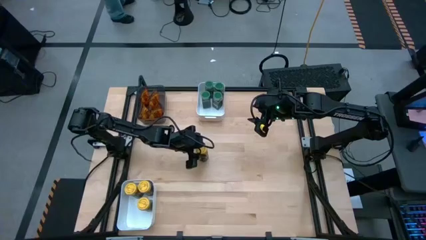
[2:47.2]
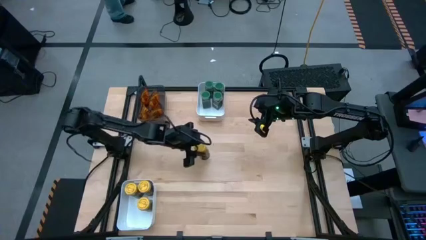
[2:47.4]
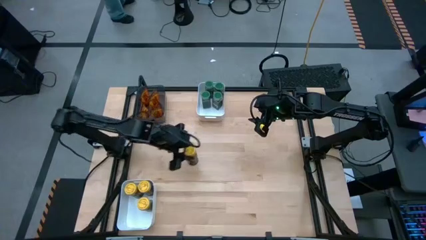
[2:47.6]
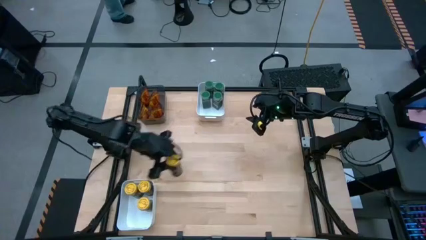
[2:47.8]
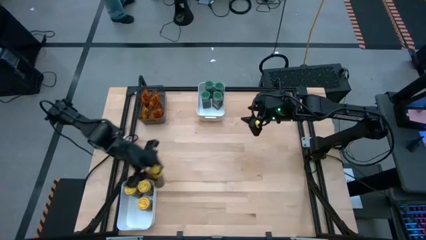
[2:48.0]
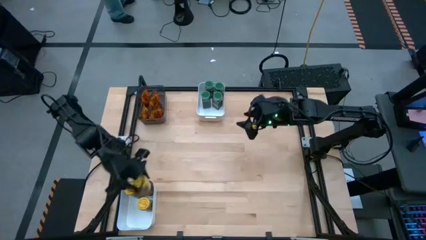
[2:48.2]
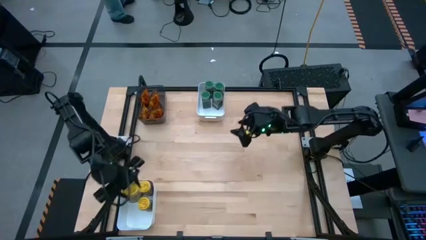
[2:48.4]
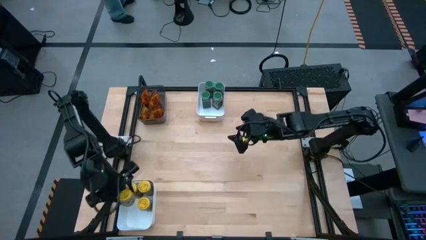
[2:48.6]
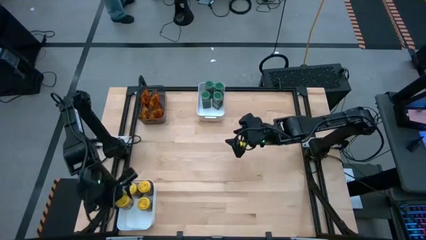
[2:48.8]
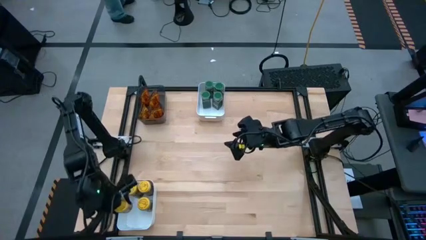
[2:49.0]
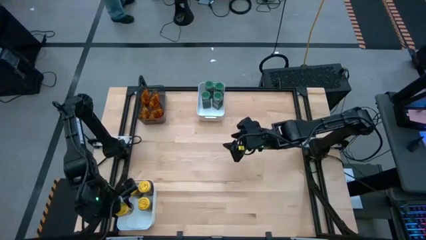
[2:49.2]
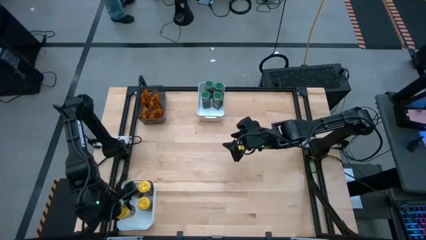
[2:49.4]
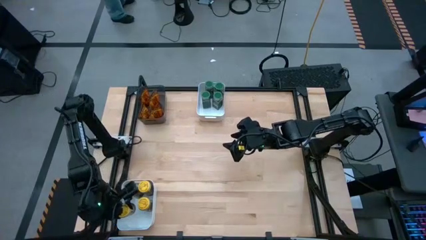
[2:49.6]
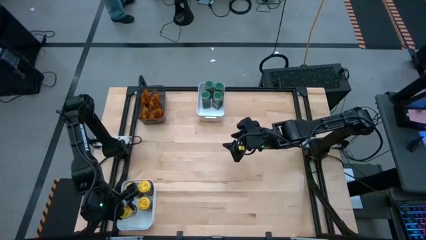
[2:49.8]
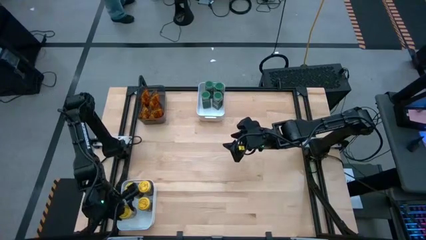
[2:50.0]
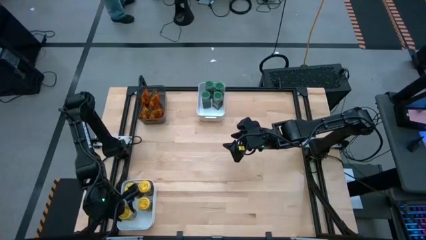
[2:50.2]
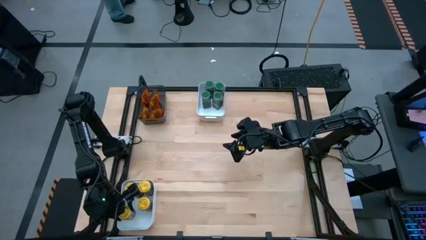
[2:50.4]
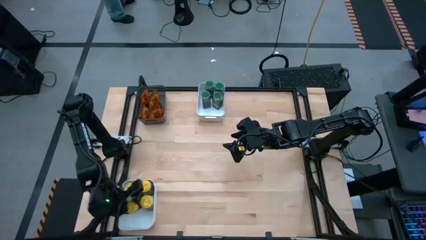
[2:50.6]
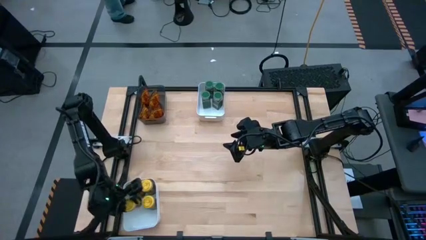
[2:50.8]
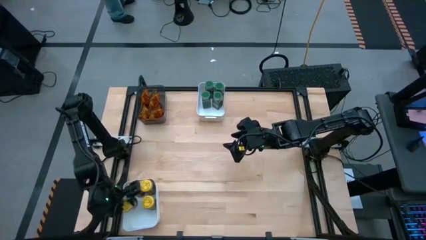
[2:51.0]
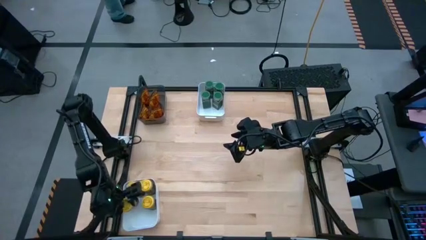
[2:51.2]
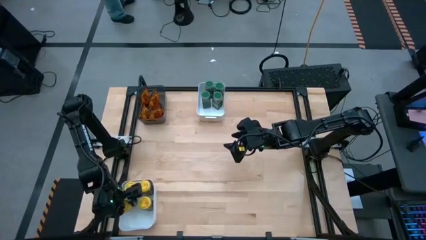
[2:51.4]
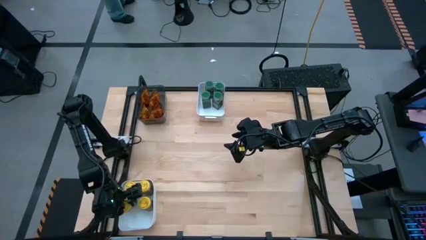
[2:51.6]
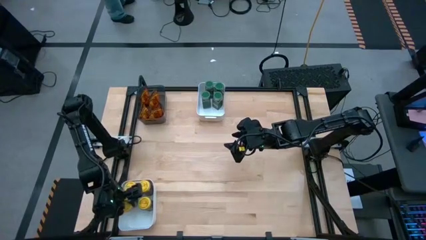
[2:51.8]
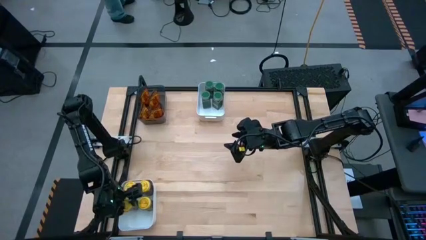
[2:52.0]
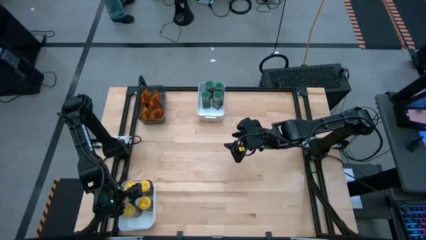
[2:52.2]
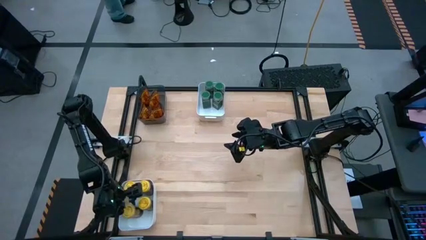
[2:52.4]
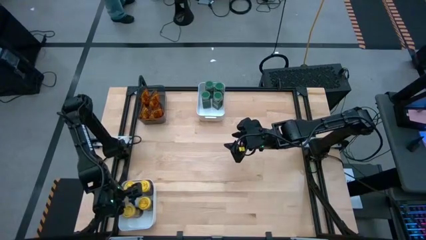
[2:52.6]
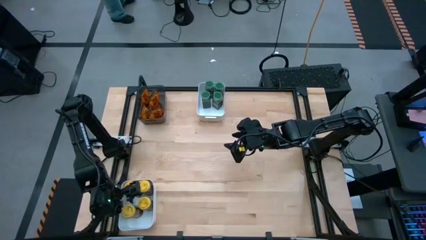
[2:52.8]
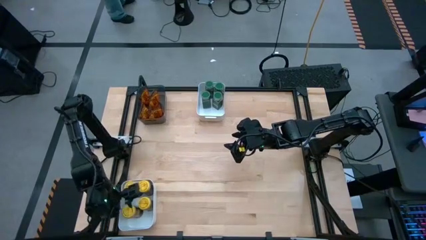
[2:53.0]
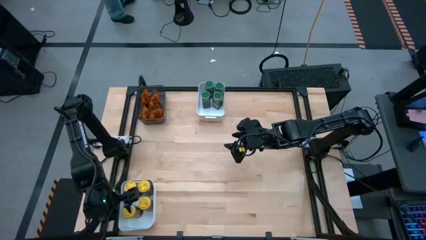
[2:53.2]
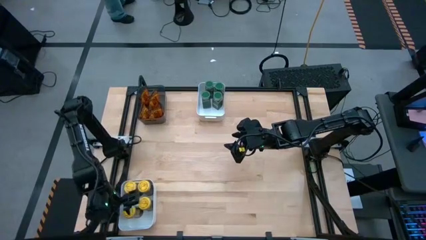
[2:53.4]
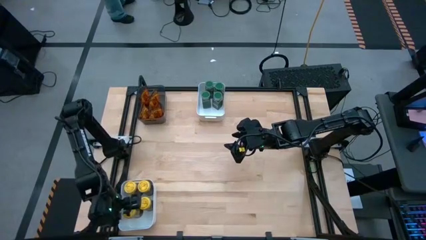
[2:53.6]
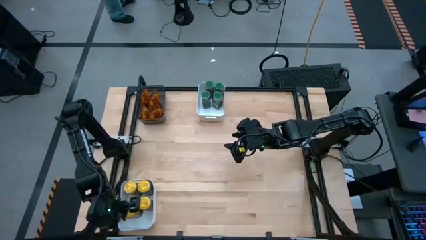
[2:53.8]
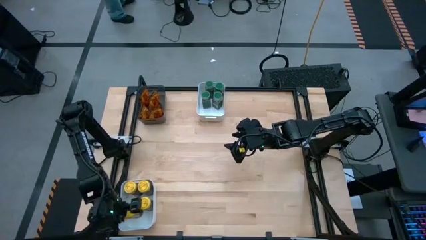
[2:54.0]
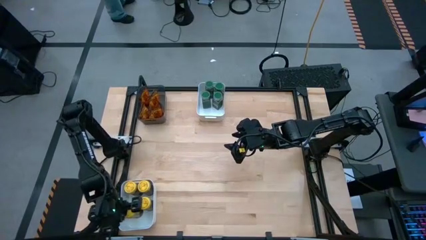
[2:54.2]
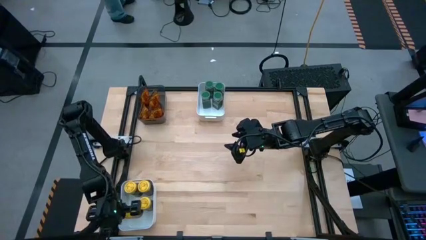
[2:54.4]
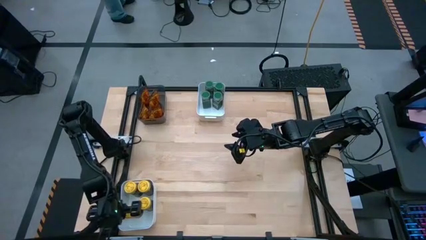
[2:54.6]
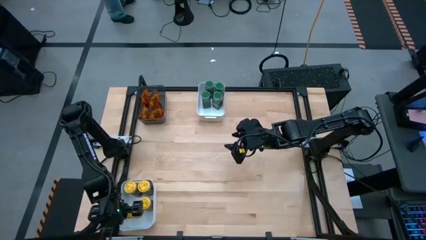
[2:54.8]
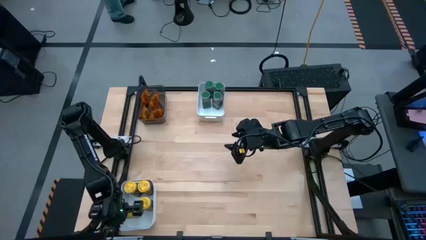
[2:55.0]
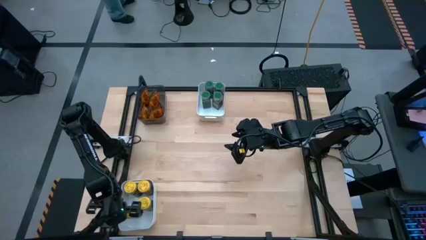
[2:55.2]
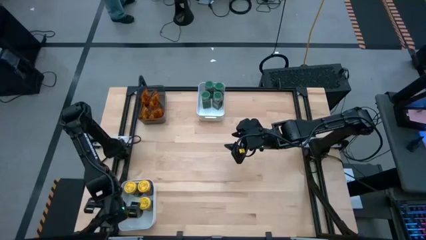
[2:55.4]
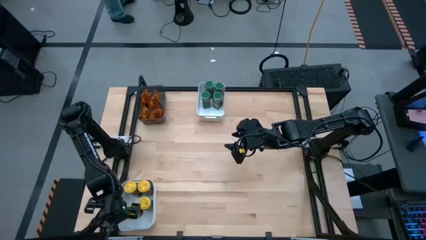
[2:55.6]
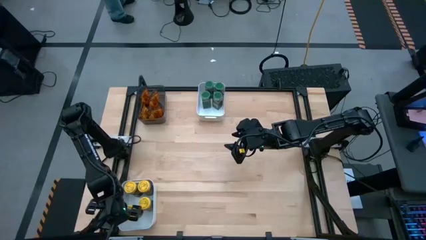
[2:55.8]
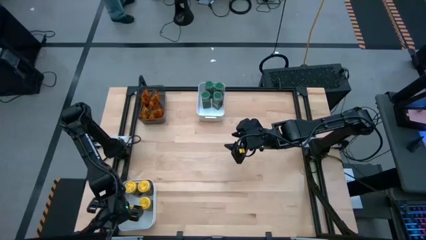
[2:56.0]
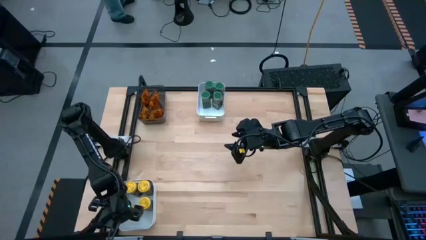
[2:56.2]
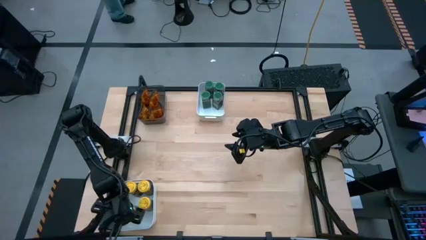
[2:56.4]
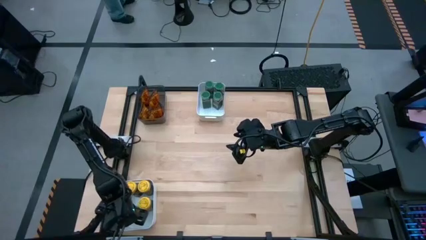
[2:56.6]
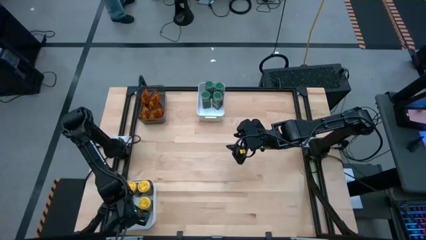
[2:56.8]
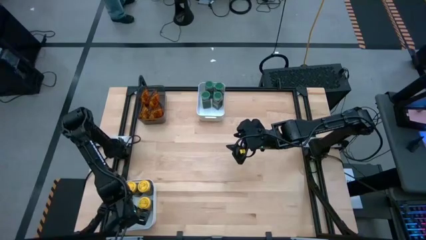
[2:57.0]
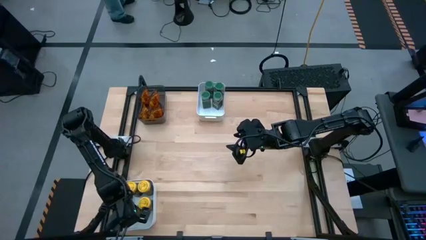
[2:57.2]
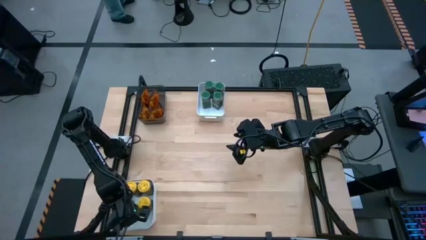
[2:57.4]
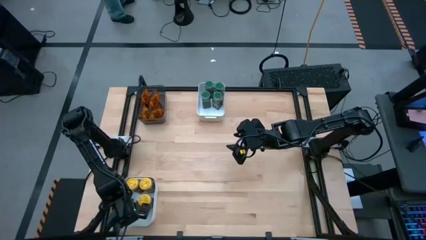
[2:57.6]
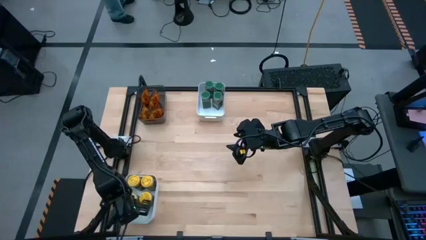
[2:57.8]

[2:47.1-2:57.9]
Task: Sort spices by type
Put the yellow seasoning bottle into the bottom white bin

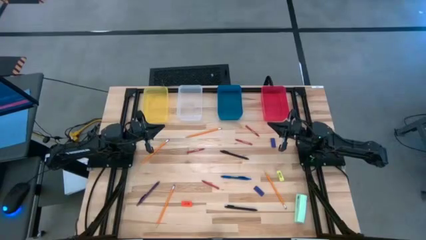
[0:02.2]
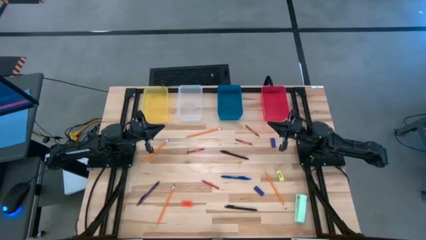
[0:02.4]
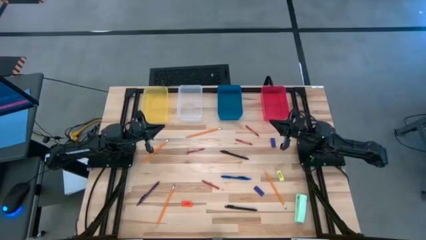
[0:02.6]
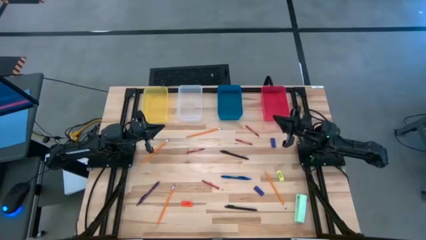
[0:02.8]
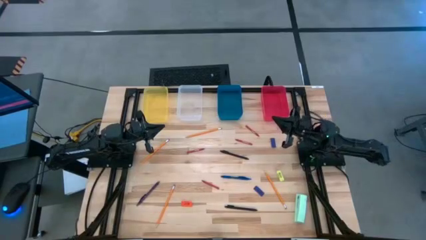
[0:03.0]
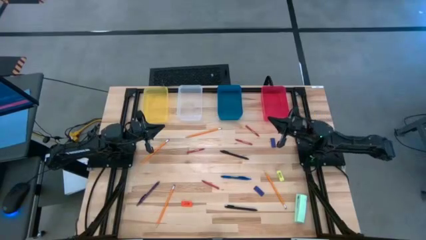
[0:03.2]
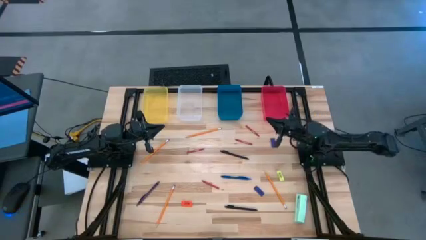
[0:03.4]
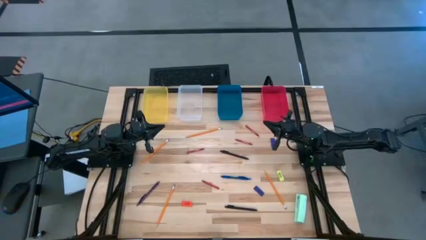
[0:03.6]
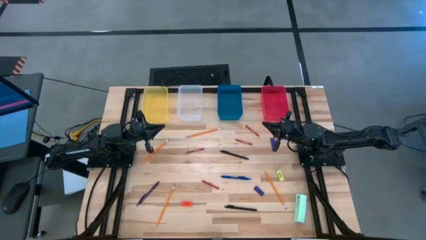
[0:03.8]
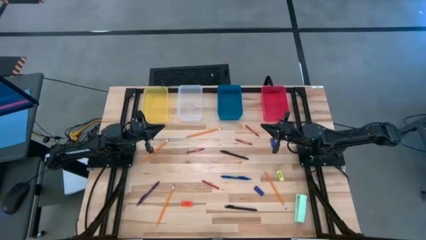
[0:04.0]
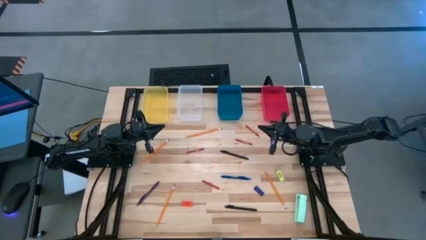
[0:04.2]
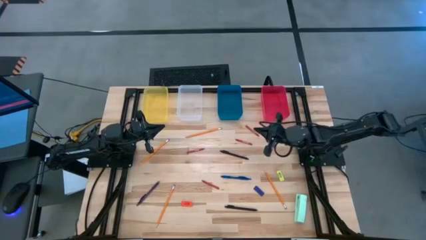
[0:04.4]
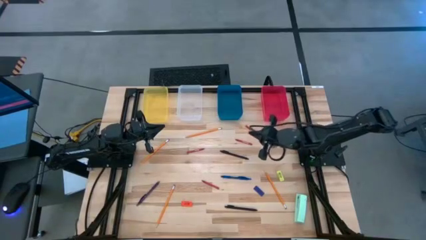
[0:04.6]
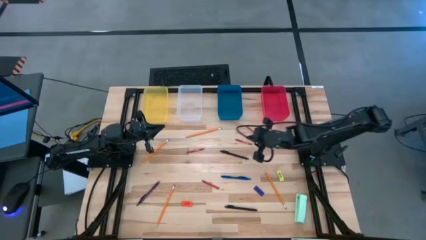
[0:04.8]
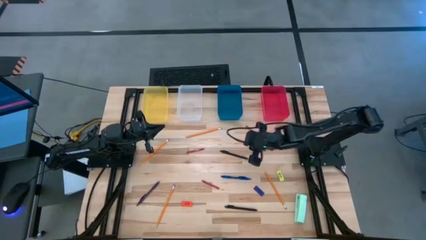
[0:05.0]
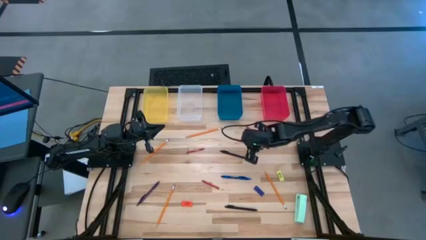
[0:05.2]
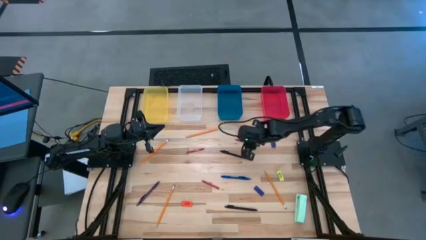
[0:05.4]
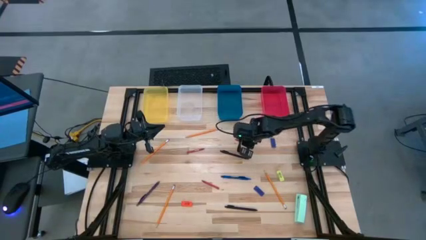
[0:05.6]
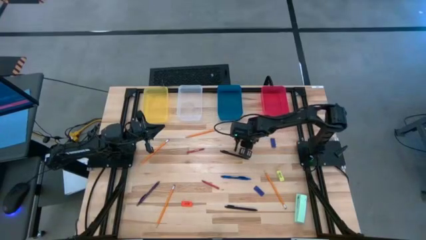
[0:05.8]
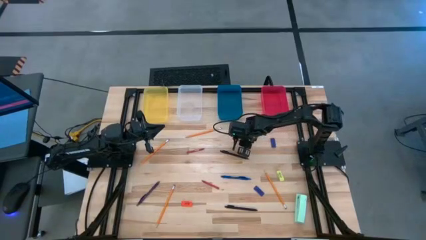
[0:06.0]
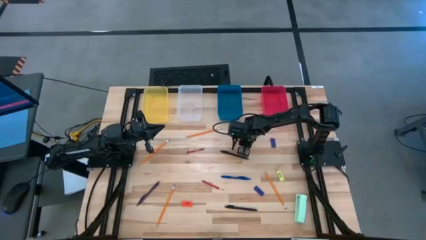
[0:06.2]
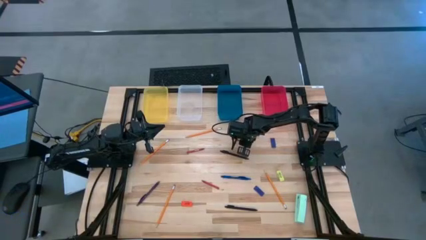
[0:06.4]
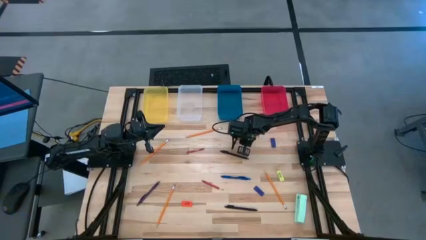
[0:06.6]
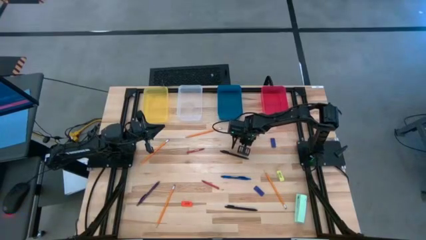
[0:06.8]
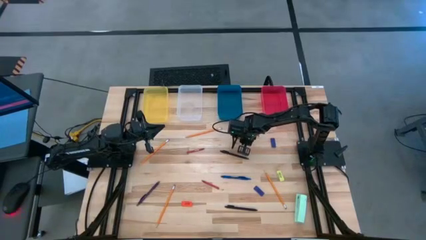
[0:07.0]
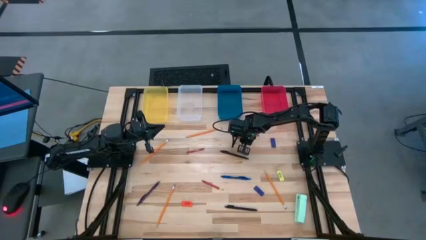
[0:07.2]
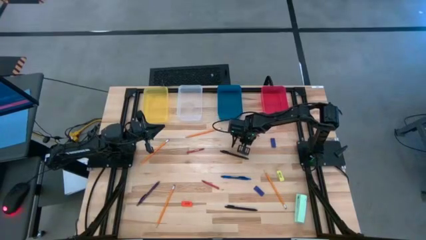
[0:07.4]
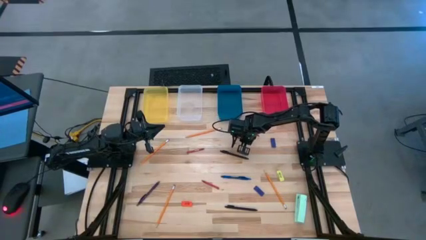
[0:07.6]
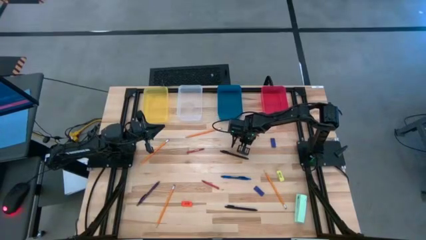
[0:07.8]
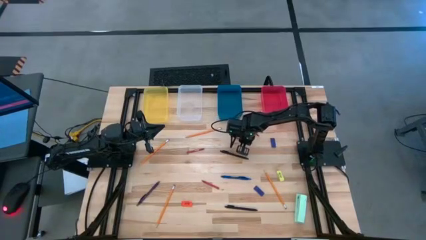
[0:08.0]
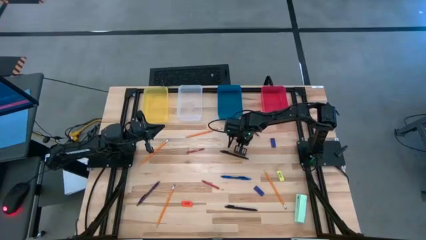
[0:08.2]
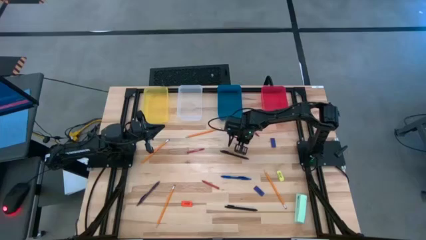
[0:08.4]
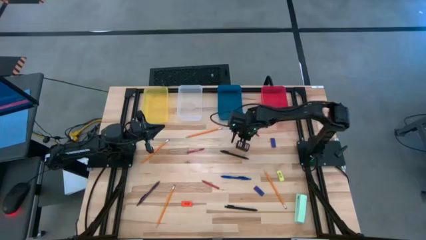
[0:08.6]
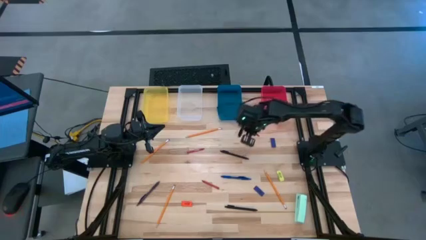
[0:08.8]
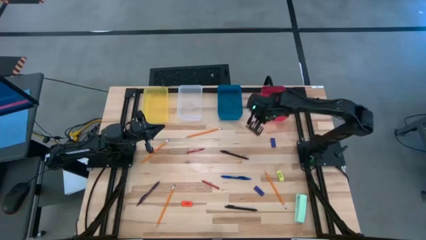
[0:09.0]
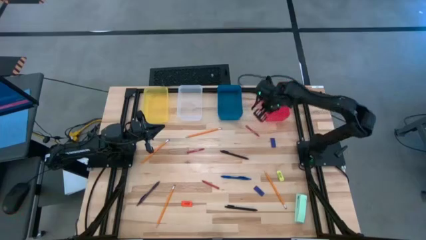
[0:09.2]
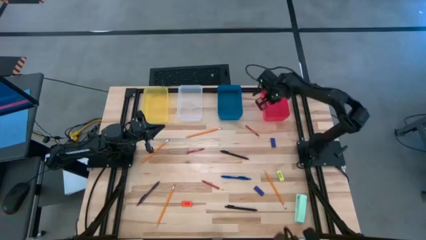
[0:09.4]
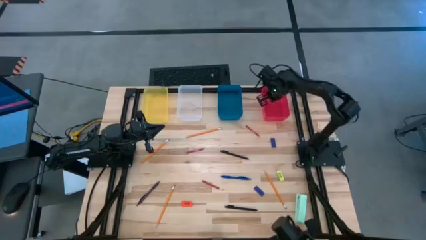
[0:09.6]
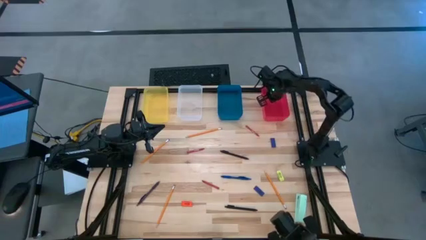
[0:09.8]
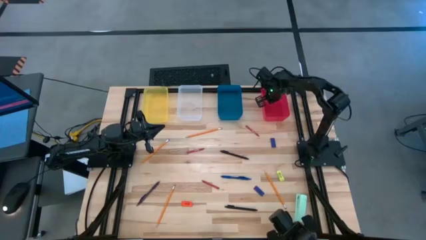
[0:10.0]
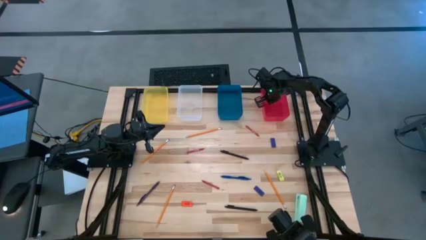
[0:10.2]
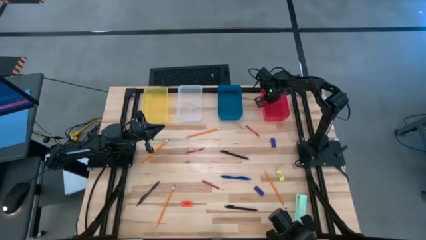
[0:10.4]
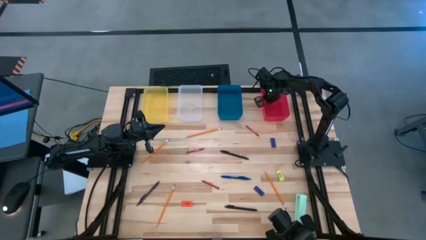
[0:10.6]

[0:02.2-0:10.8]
Task: Sort crayons/erasers/pens/pencils in bins
Put the red crayon into the red bin
